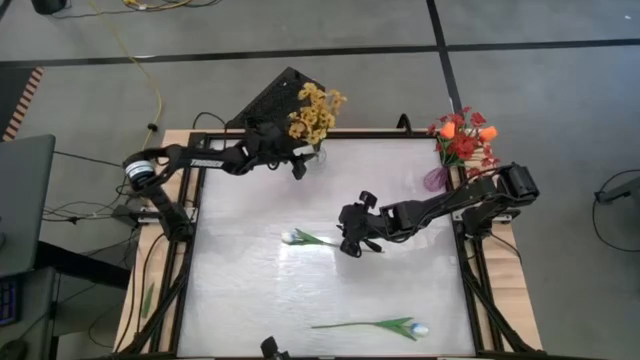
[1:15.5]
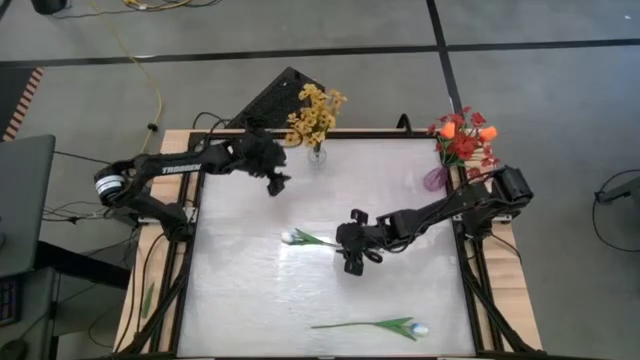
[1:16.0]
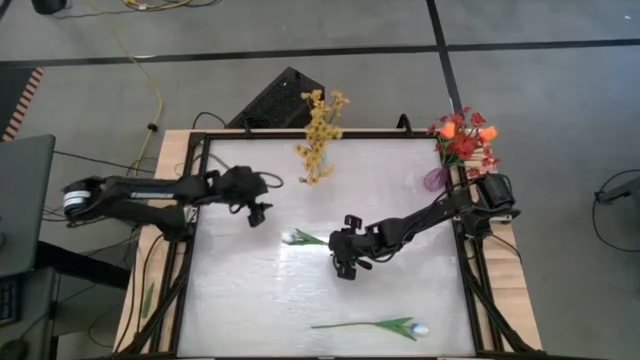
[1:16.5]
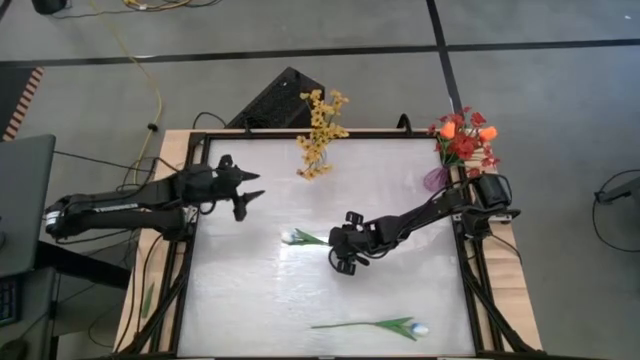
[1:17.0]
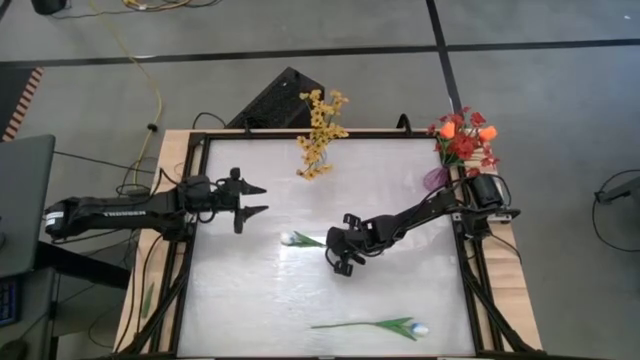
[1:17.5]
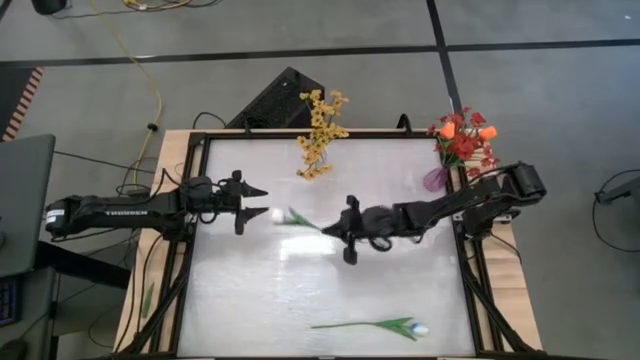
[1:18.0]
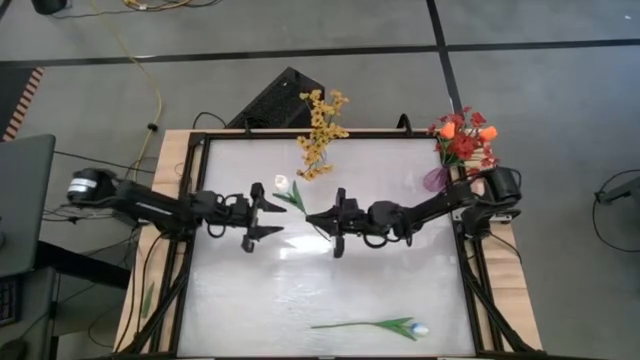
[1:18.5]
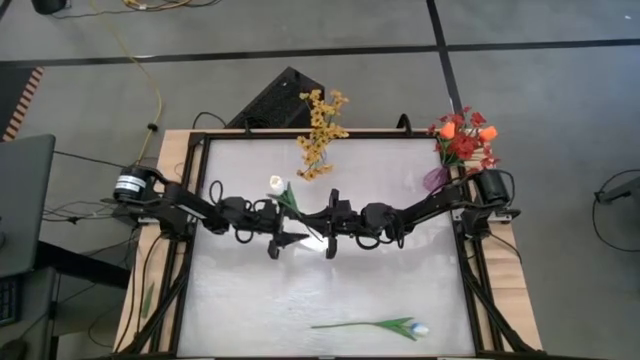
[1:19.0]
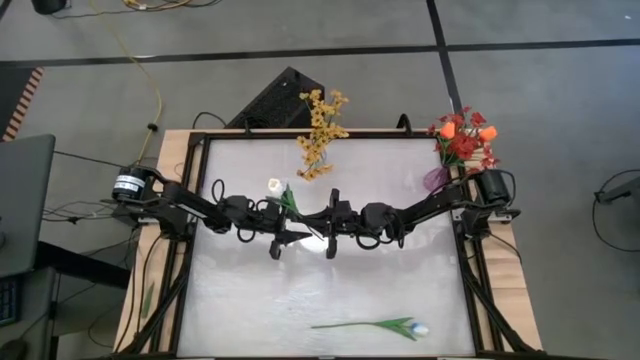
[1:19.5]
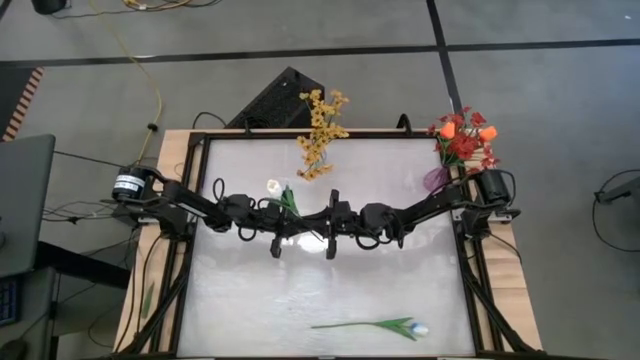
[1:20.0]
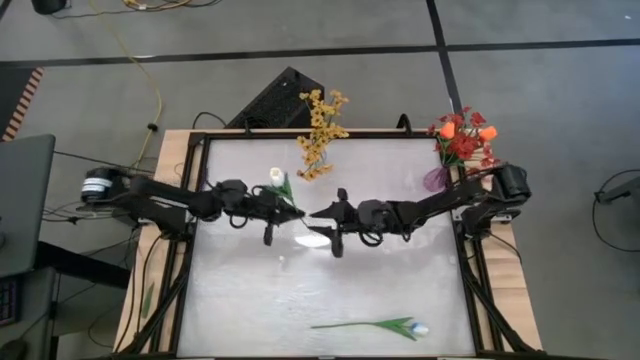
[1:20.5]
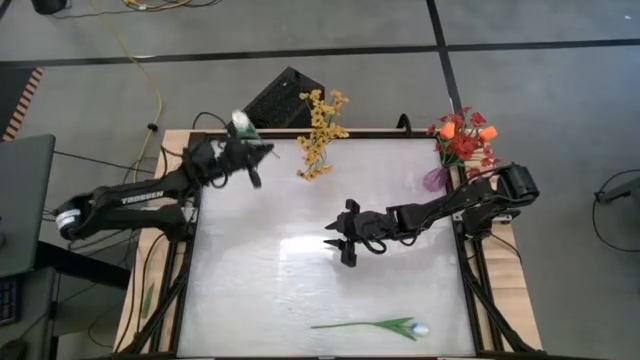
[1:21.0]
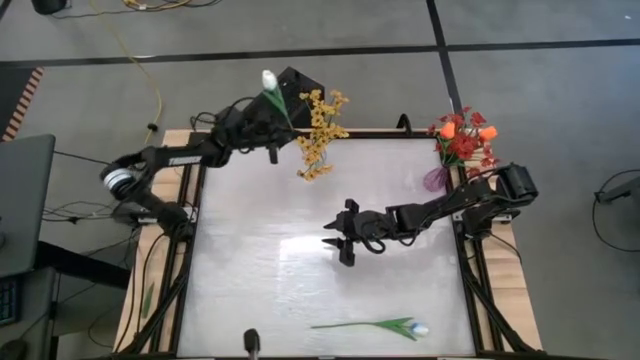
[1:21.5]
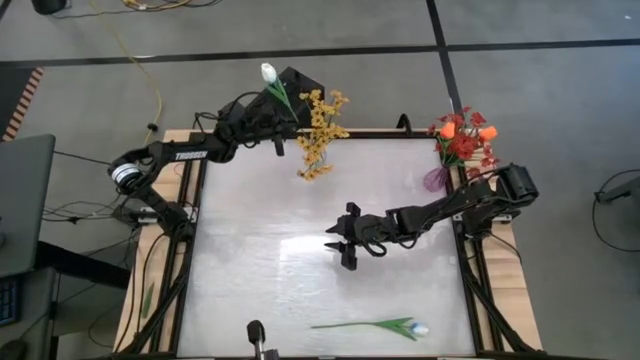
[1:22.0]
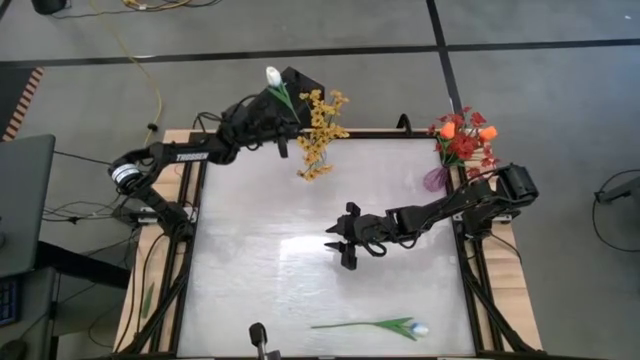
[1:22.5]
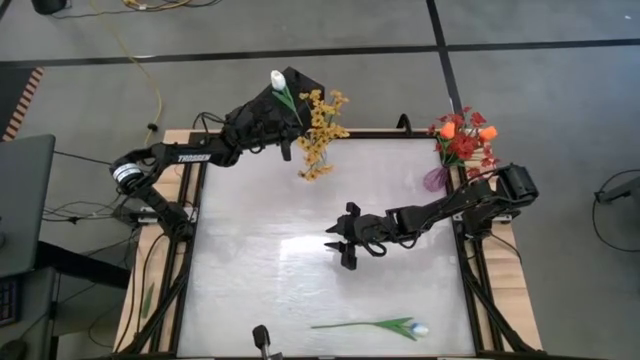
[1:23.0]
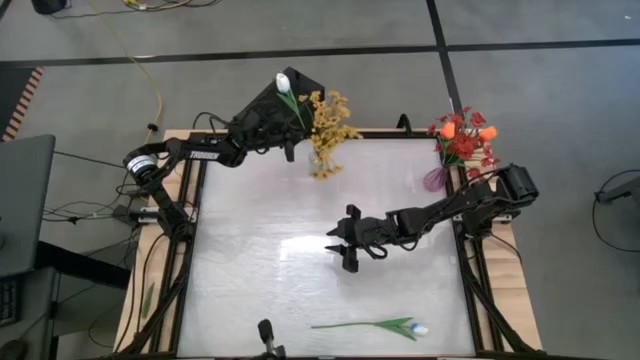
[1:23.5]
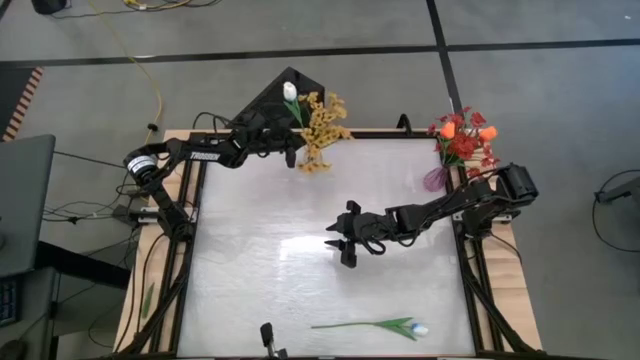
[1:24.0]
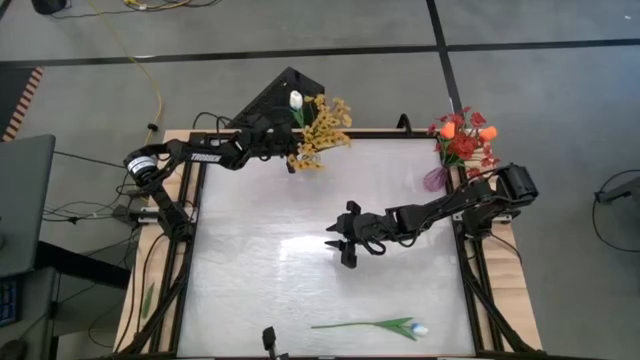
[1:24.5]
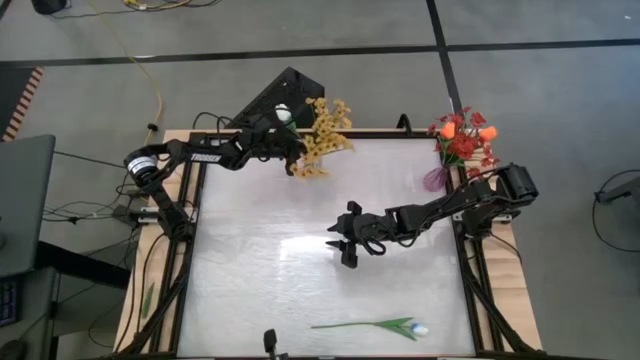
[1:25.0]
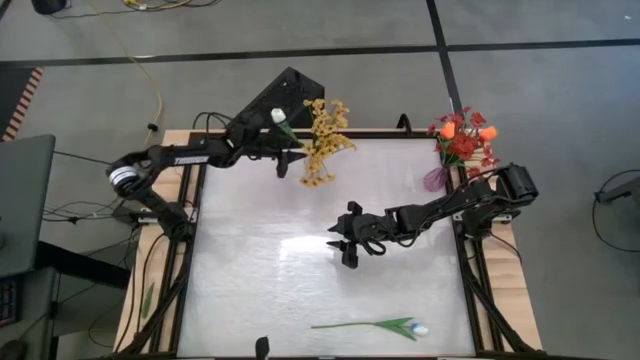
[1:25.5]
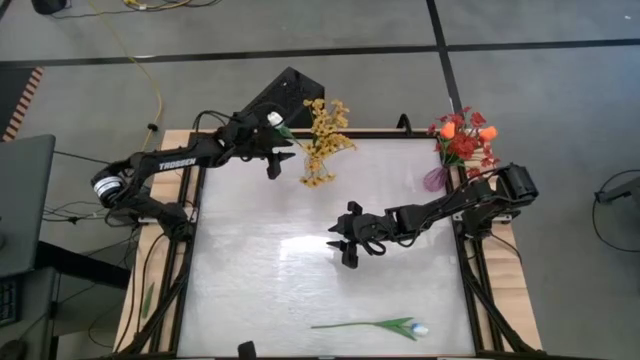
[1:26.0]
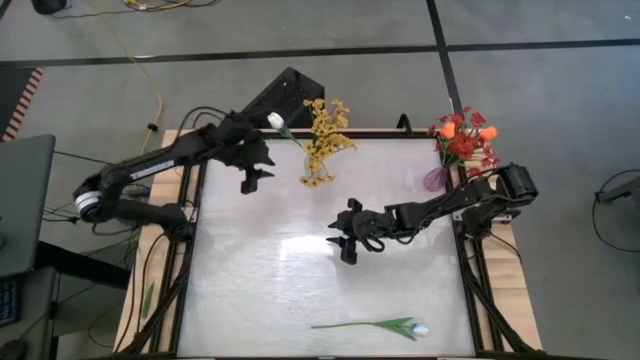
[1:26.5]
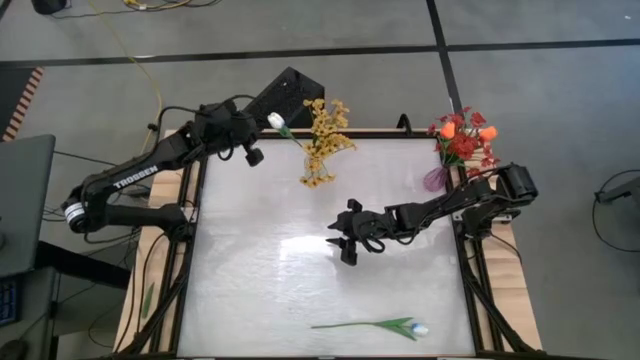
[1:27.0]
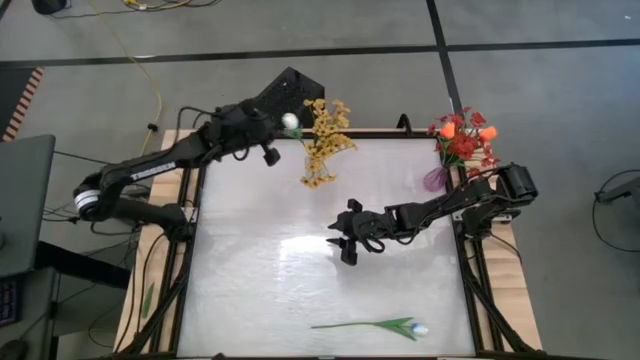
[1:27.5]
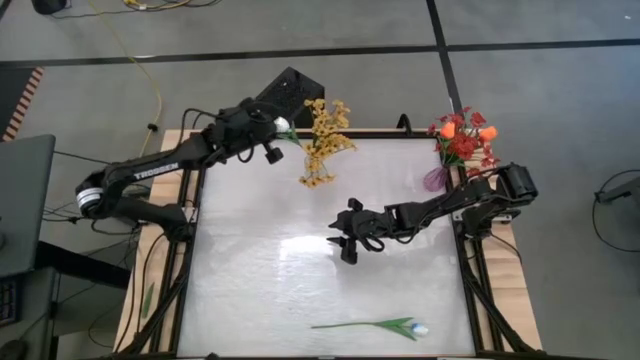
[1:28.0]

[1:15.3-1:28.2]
Task: Sort flowers into vase by color
Put the top white tulip into the transparent vase
